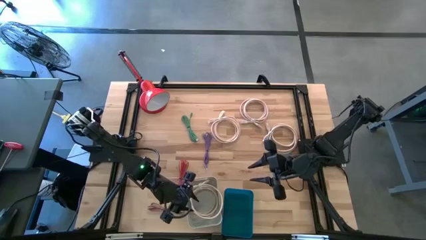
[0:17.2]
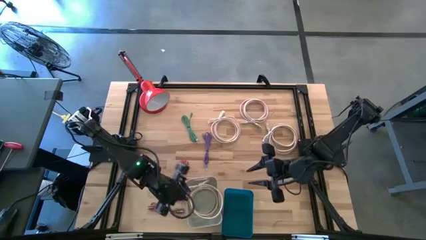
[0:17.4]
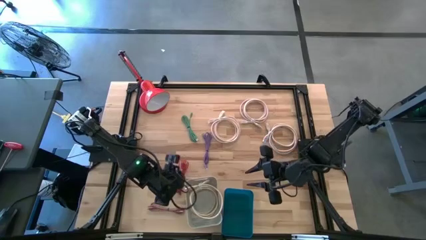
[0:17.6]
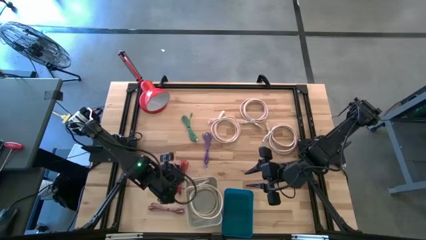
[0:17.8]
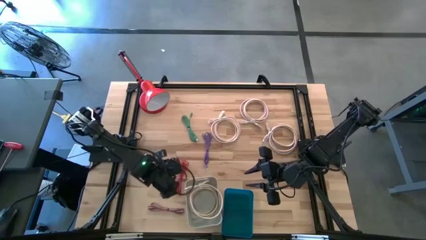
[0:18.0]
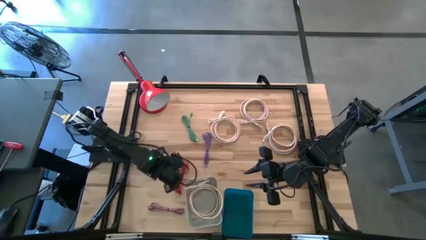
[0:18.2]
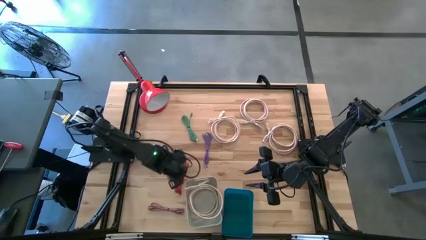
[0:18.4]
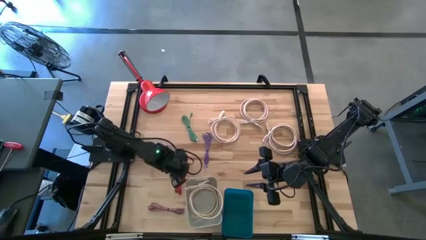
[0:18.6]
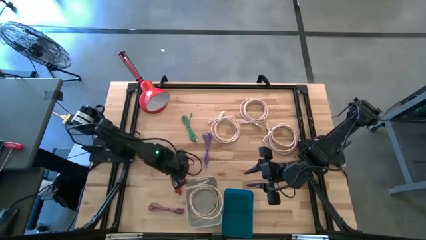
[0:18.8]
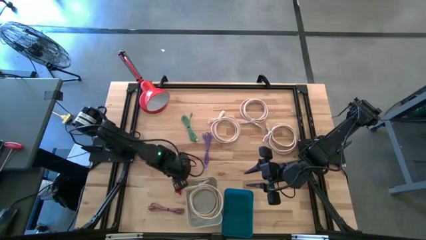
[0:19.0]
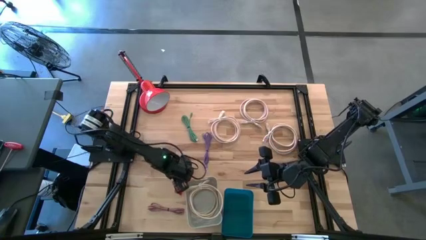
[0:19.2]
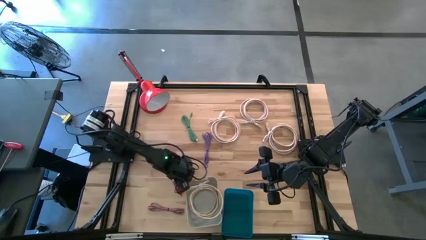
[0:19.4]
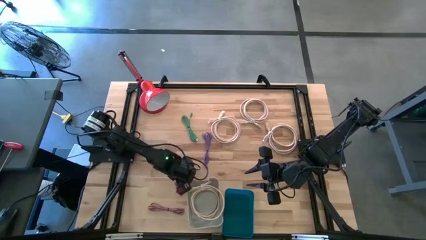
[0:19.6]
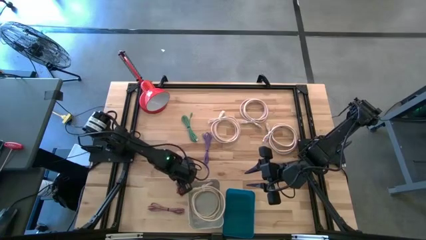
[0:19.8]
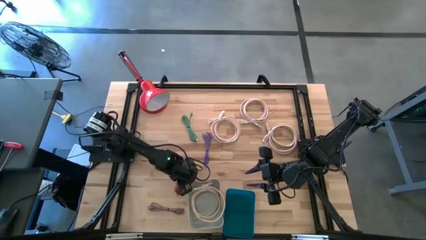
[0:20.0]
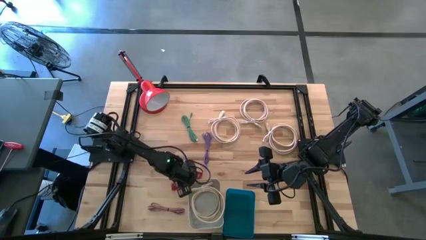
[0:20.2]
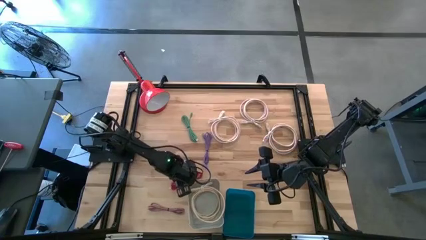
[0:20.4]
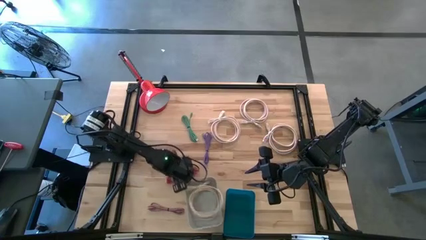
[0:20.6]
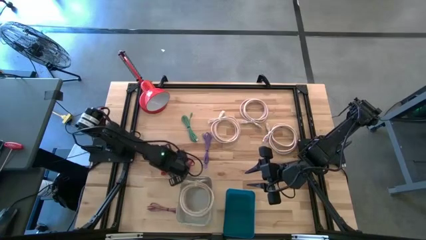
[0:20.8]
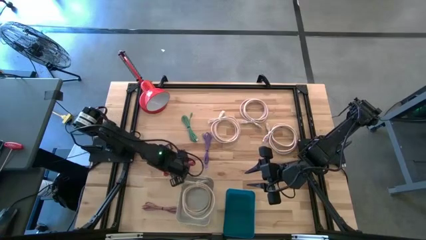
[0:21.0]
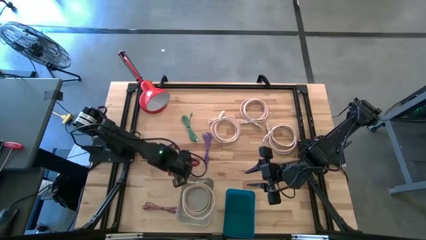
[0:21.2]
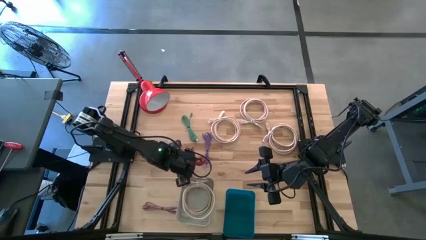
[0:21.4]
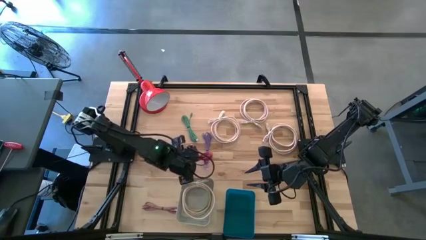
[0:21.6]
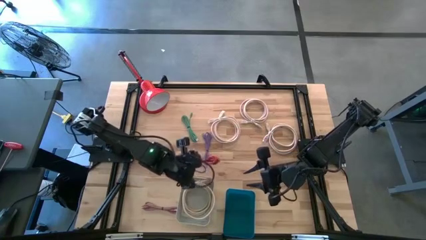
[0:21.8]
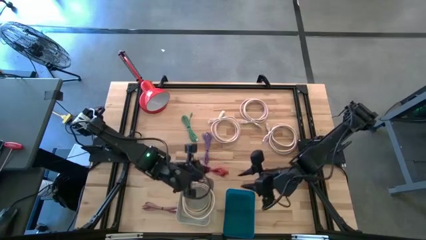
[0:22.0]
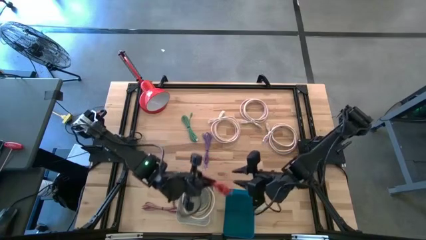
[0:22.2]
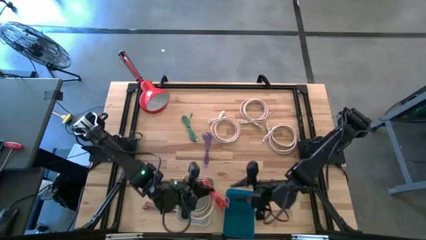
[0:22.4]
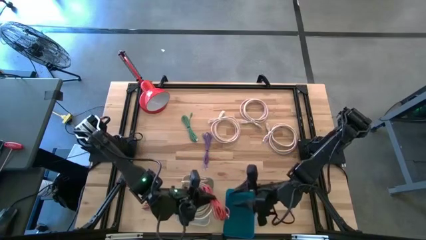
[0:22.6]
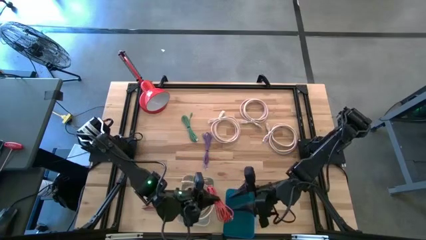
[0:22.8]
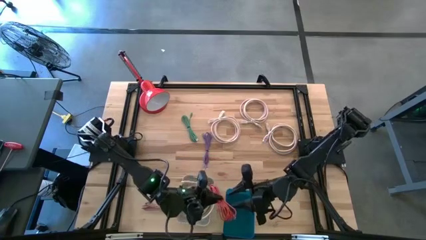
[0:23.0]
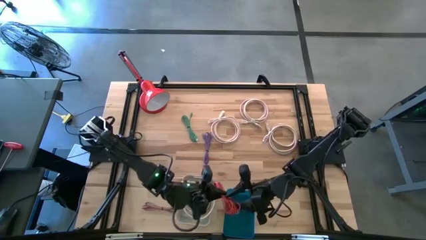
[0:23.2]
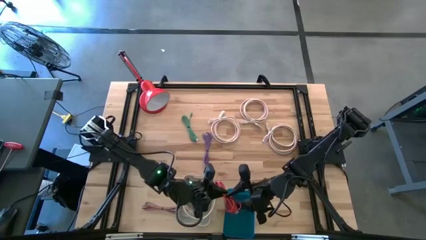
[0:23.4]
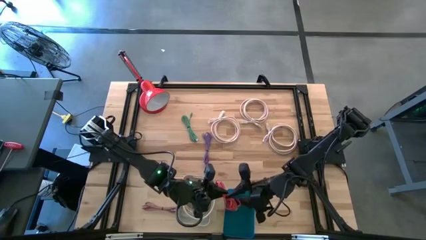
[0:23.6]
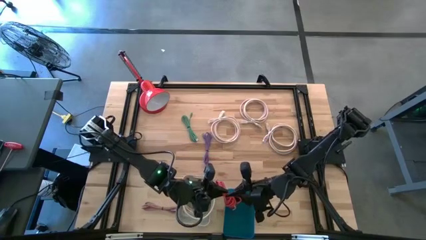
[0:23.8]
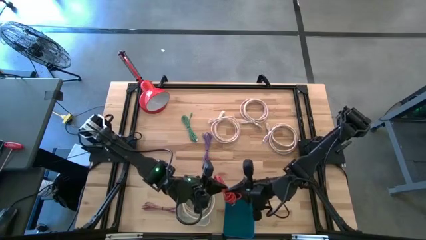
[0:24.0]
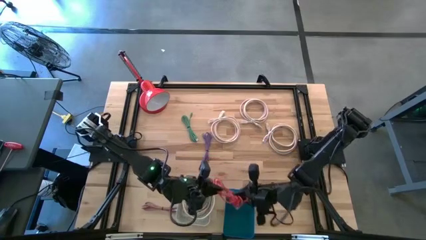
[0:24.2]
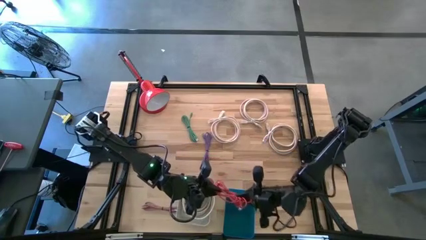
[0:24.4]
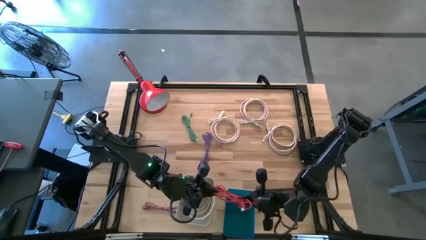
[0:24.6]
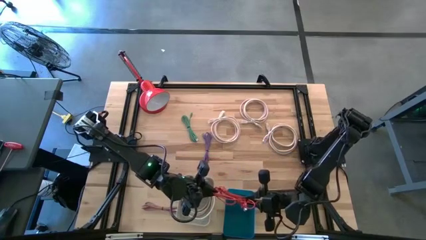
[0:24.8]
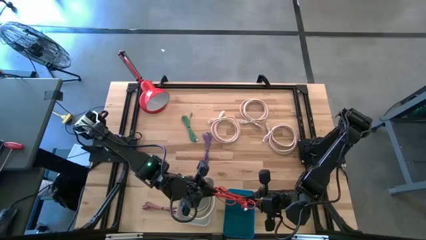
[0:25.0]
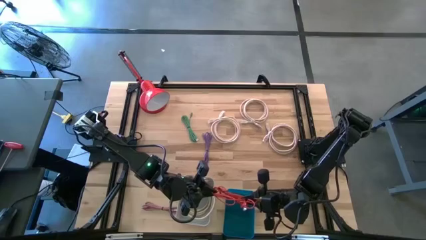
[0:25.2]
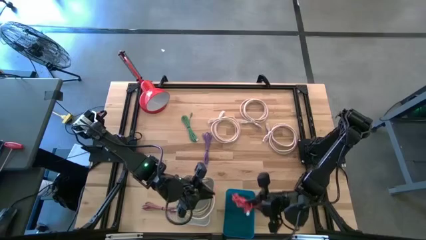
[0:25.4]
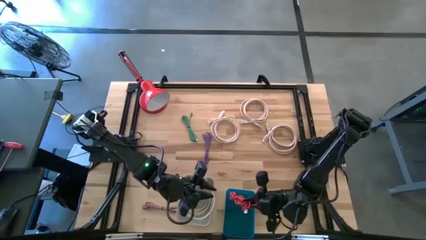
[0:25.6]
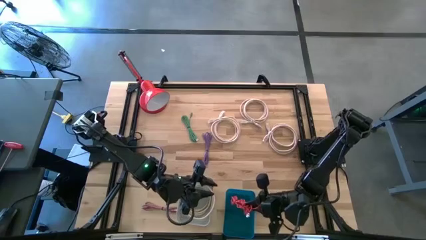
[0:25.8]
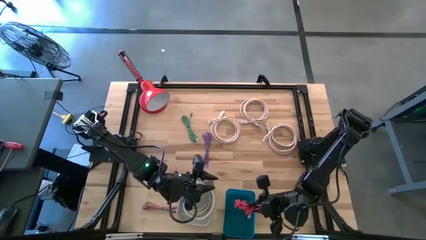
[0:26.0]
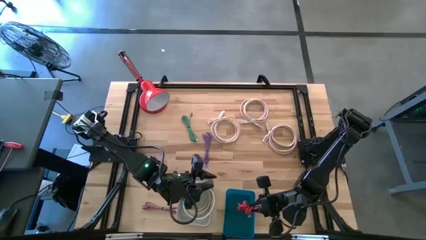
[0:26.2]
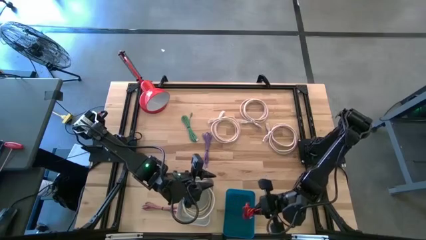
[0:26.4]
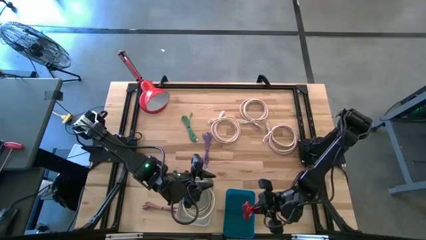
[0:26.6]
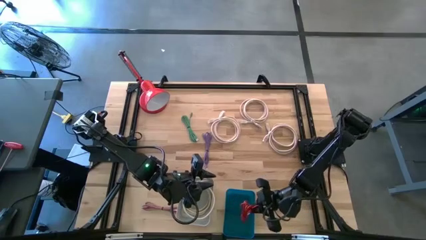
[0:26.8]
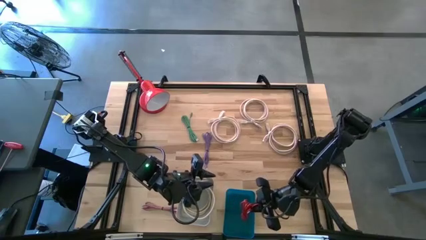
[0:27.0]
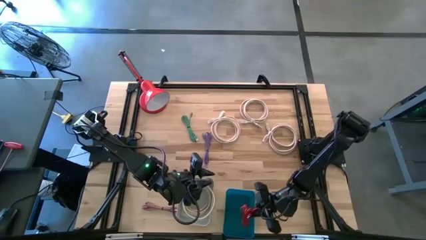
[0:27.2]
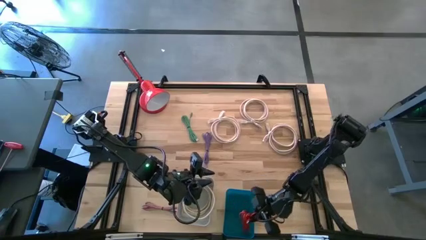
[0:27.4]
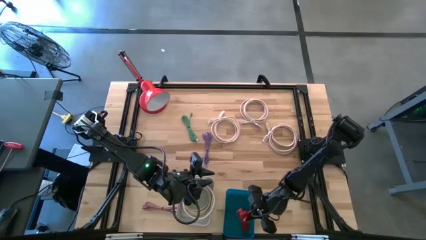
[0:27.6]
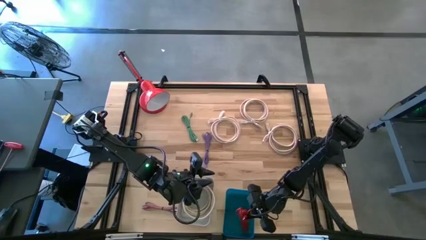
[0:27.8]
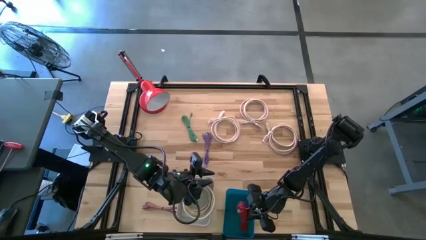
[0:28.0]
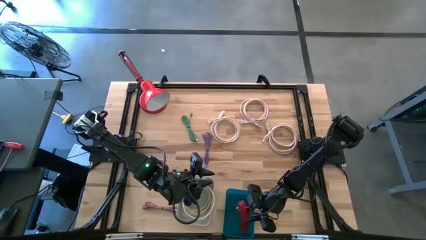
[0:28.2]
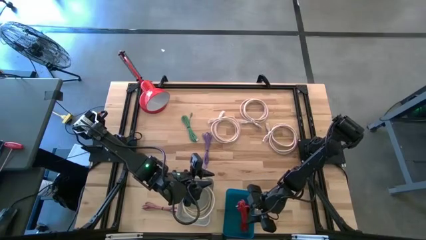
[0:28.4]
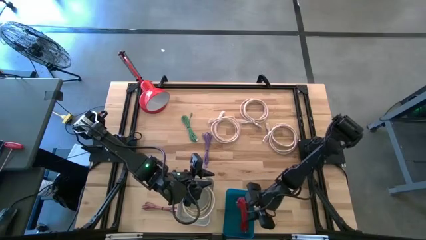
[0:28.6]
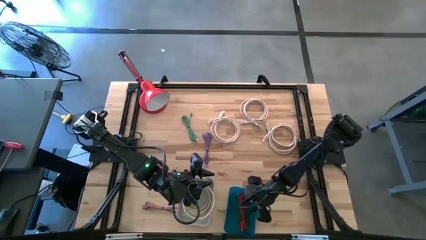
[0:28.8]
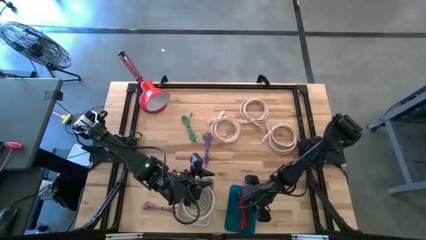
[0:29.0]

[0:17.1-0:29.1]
Task: Pick & Place USB Port
Put the red USB cable into the blue bin

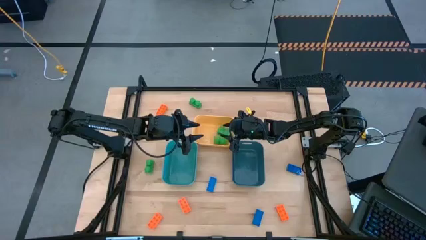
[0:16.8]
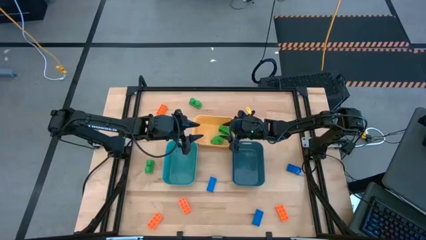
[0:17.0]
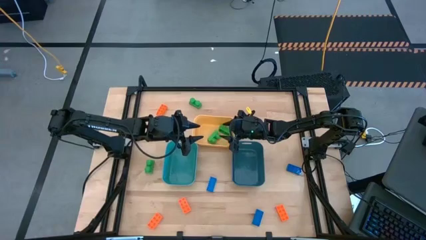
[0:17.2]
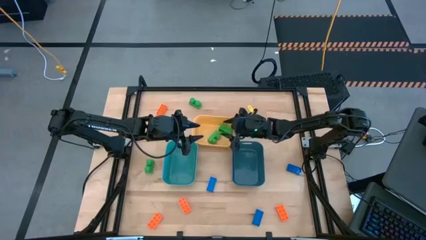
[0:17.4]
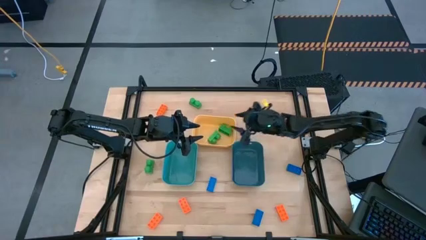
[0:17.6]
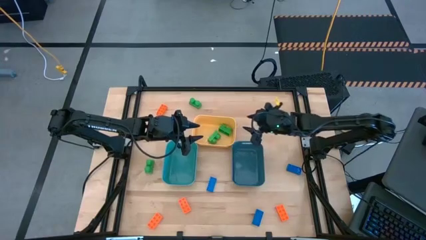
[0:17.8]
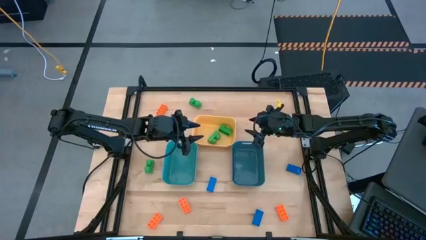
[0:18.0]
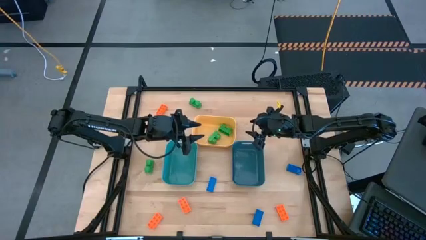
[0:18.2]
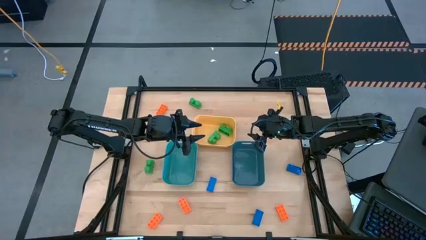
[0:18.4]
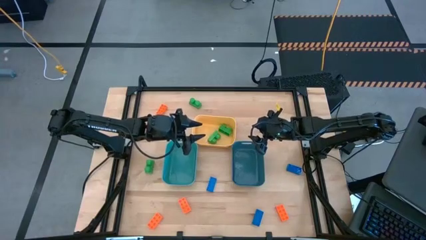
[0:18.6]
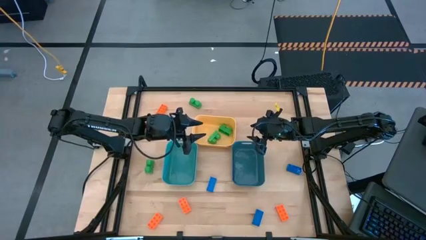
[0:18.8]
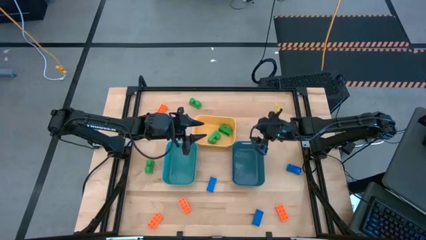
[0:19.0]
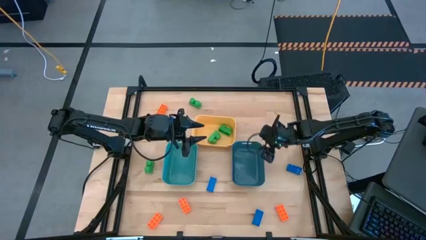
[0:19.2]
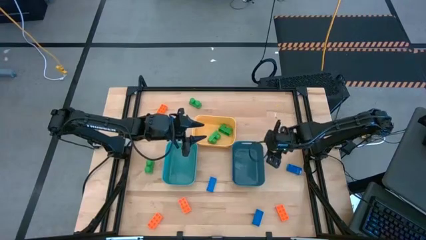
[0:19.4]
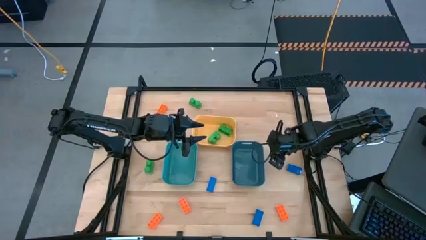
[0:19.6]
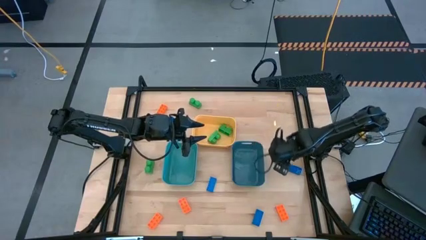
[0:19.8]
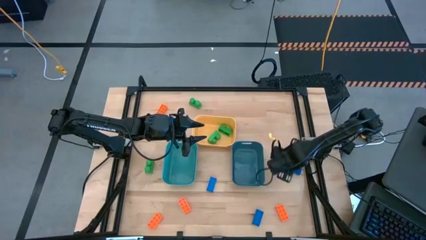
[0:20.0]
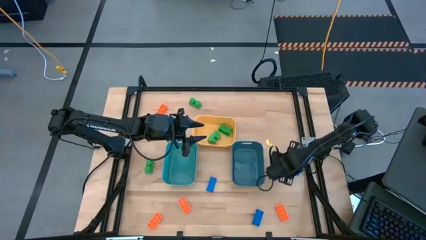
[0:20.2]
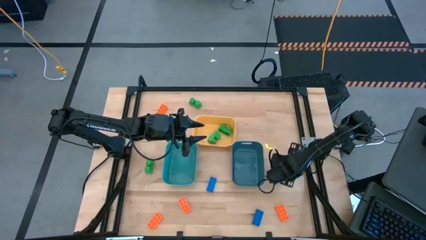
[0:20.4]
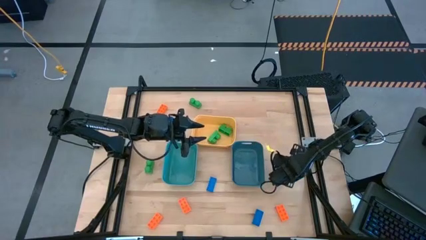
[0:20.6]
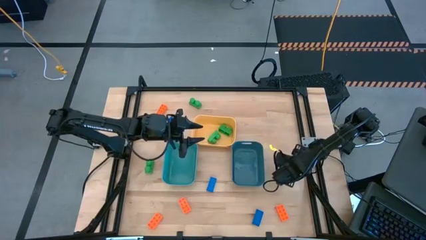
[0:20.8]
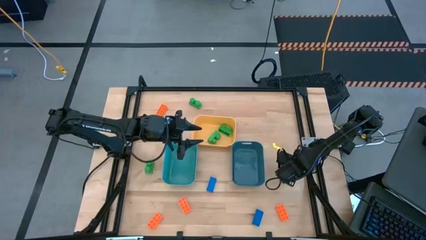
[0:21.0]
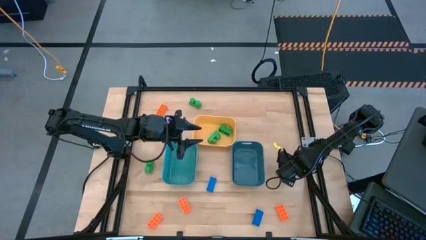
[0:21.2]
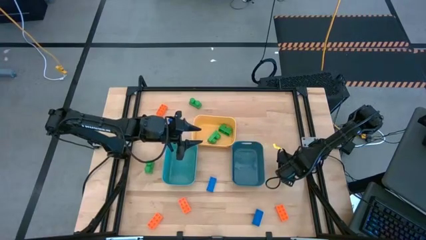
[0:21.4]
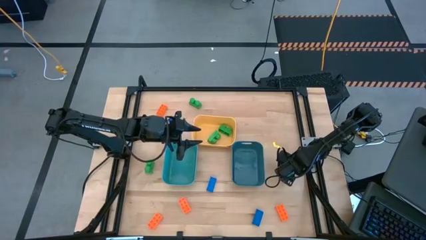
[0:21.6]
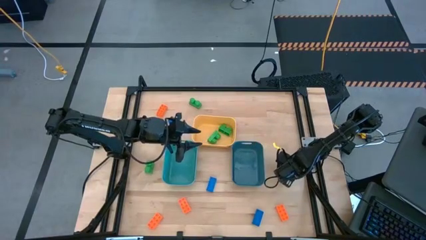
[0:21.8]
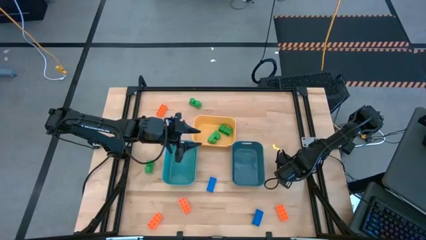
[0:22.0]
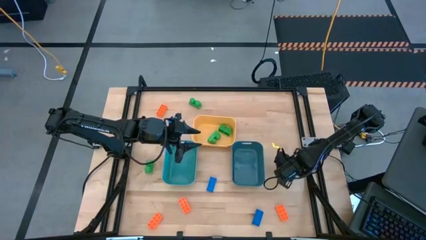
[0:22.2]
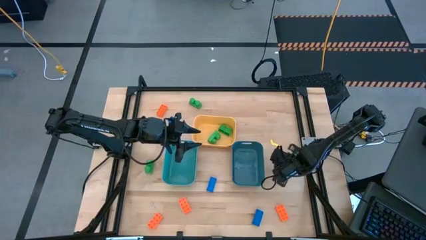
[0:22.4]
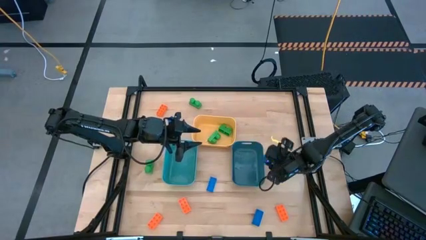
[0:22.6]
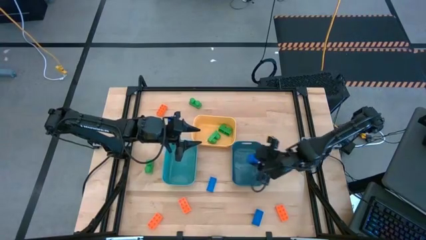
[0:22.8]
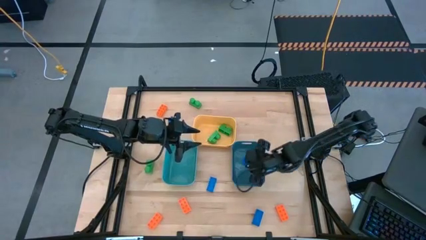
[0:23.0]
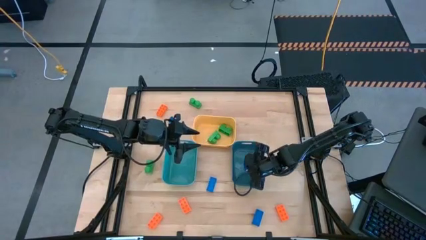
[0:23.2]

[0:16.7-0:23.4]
Task: Sort & place blocks by color
Put the blue game piece into the blue bin
